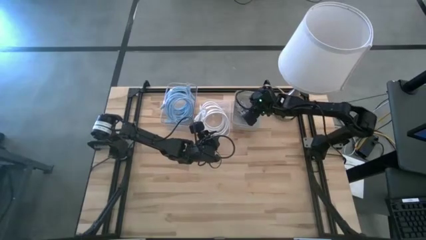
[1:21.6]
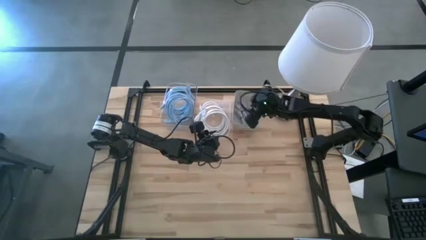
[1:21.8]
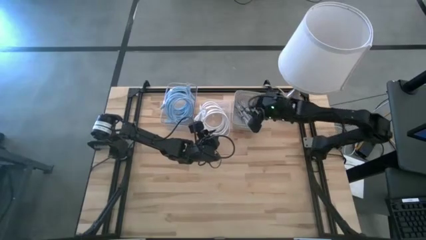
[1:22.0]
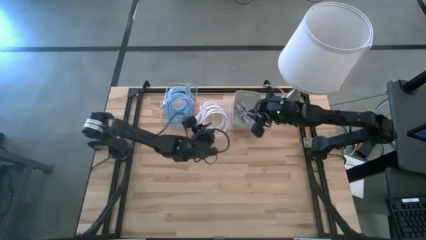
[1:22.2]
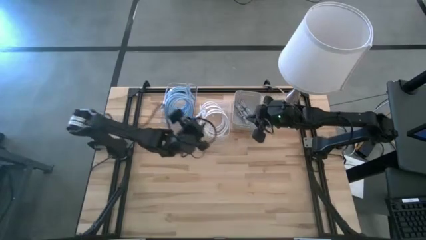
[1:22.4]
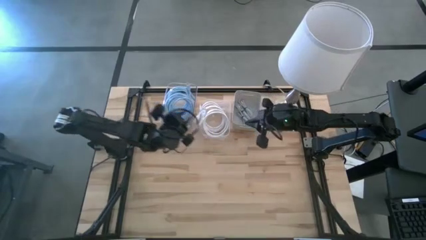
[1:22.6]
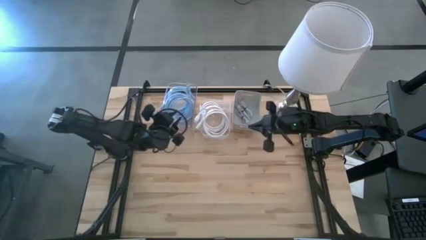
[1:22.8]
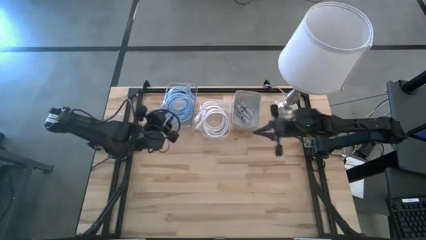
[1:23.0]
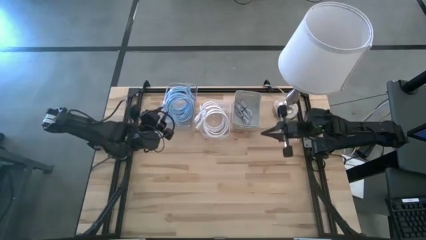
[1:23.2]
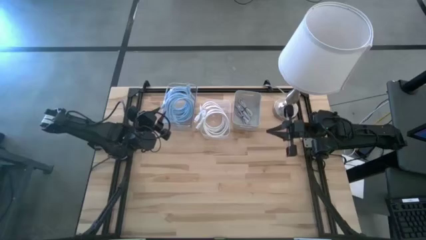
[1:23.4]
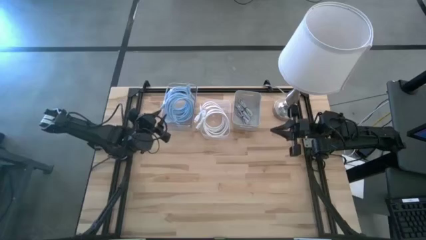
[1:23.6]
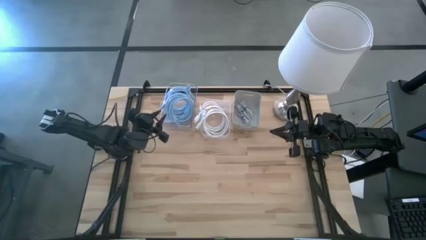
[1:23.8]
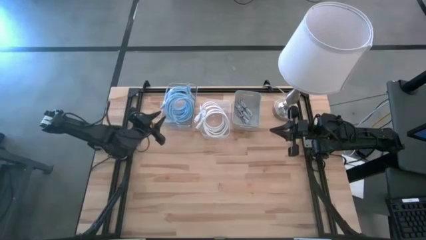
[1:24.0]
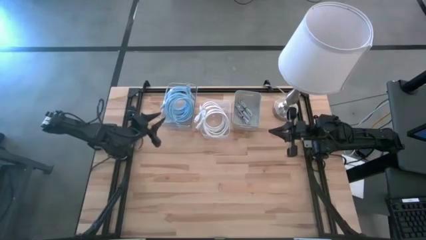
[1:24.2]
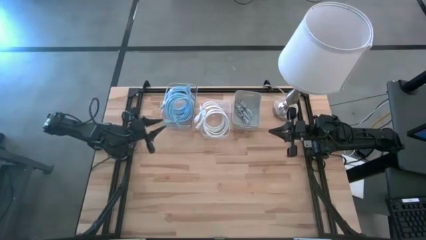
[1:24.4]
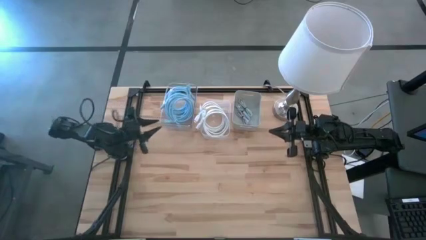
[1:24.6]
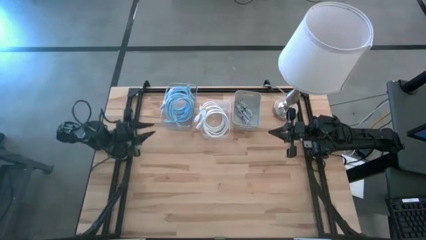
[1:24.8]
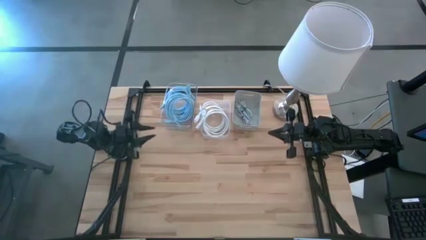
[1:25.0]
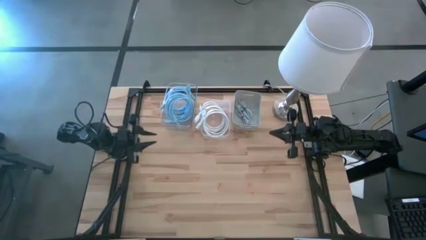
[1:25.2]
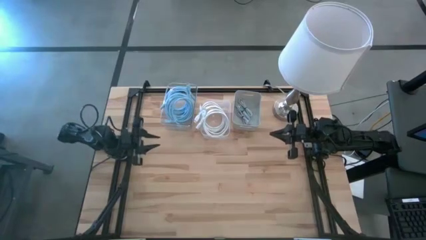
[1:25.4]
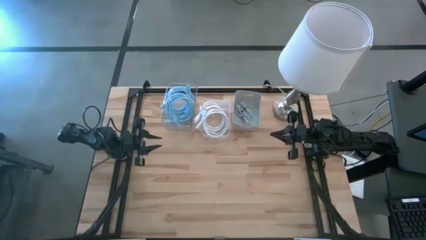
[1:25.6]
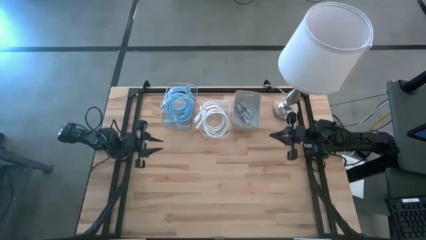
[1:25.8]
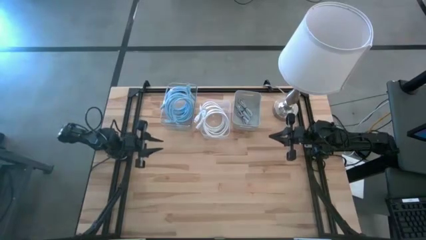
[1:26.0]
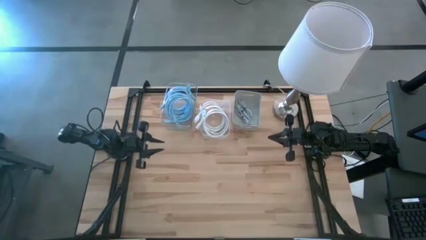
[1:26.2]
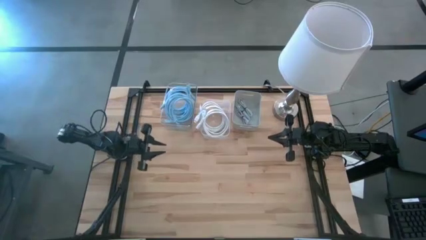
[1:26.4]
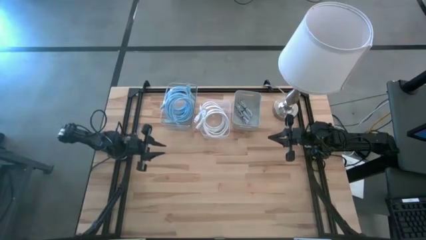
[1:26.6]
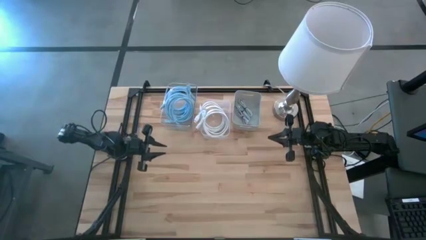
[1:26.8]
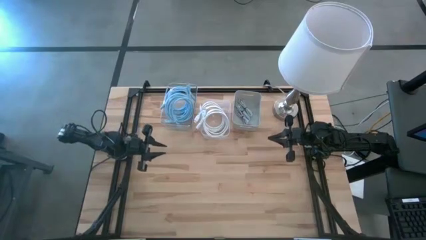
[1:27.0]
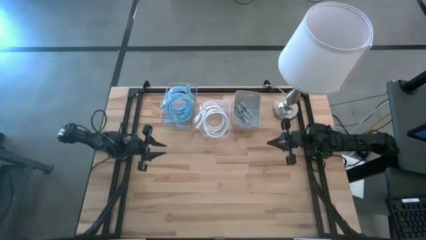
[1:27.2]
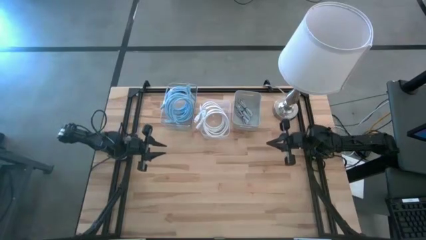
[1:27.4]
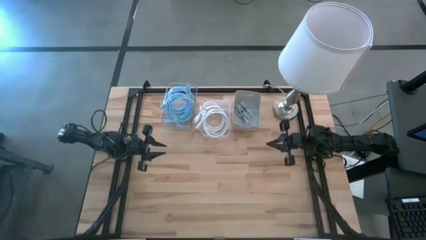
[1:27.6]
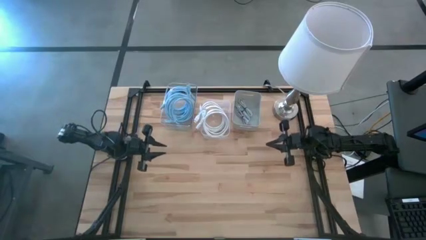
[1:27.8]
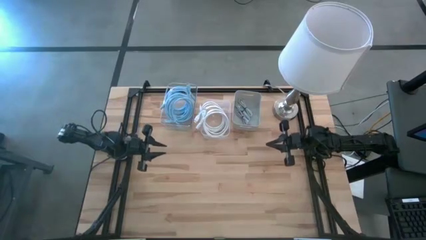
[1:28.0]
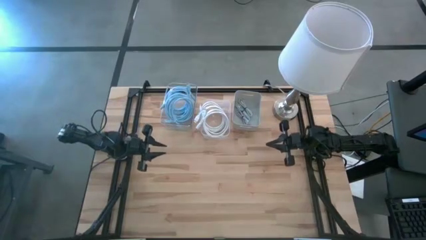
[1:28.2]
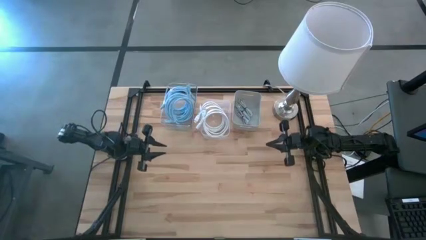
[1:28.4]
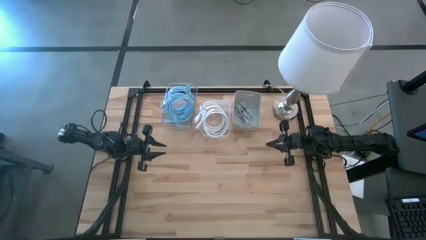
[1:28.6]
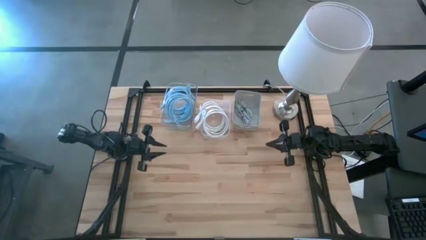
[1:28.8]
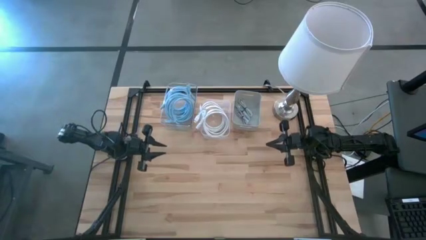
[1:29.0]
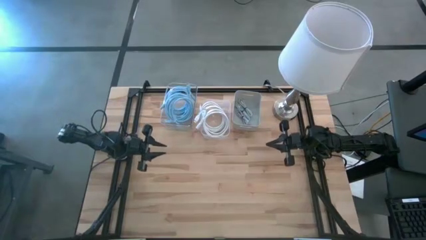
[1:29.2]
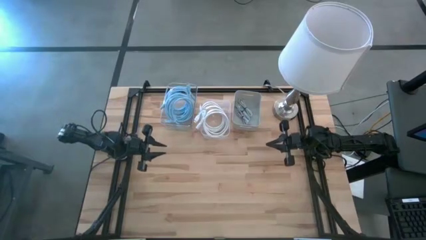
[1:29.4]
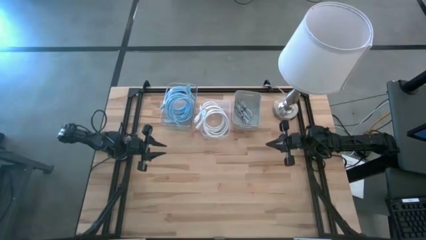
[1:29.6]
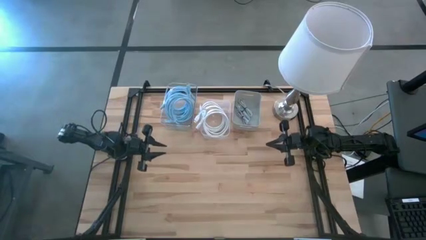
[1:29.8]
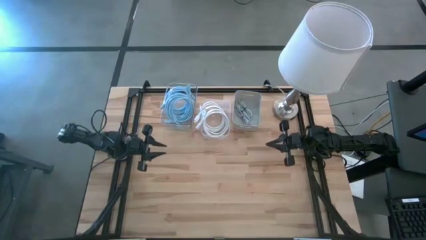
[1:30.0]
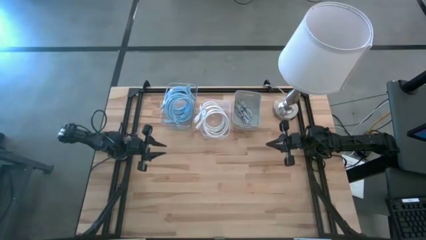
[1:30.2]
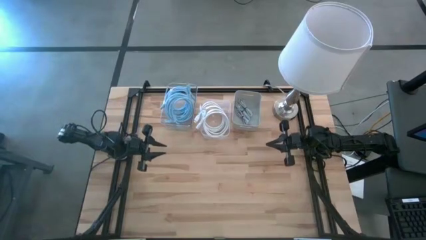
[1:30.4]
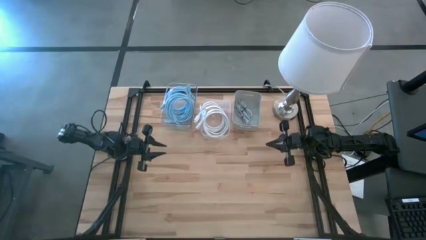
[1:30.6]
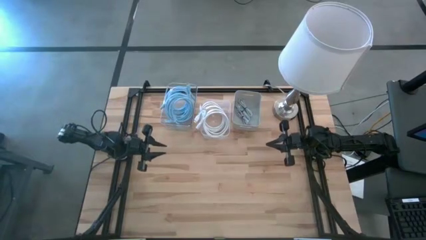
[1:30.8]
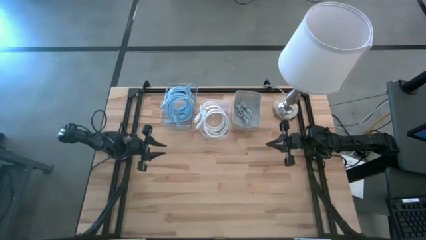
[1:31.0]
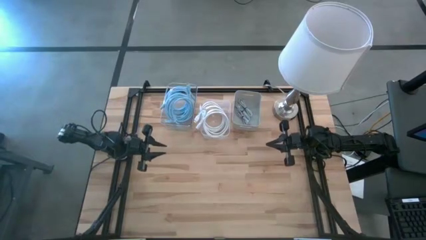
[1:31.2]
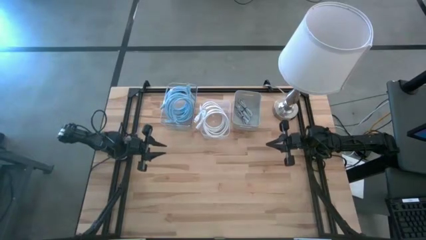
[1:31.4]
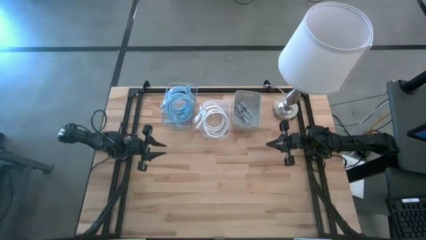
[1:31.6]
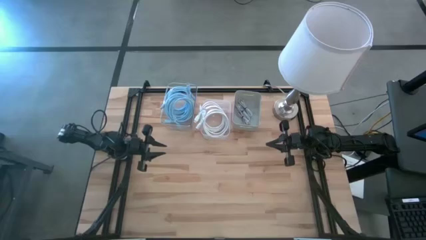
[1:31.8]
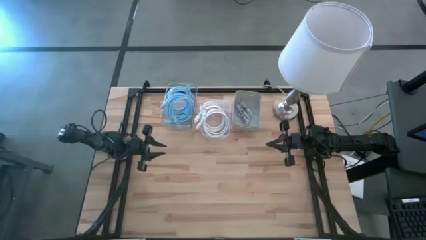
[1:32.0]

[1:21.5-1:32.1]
Task: Pick & Place USB Port
Return to Home Position
